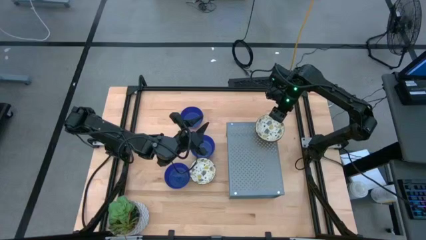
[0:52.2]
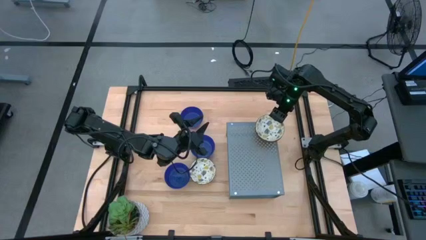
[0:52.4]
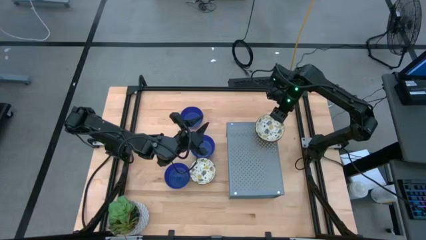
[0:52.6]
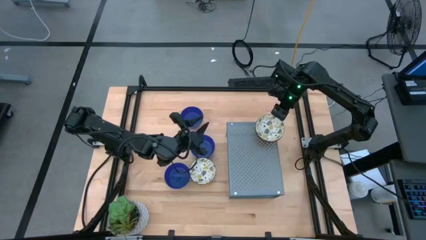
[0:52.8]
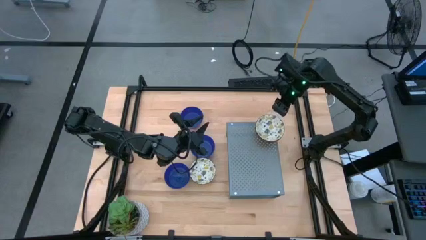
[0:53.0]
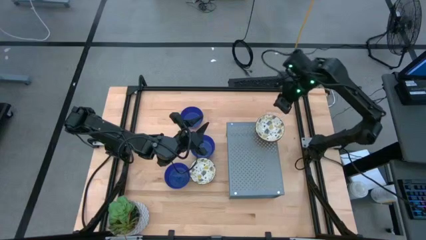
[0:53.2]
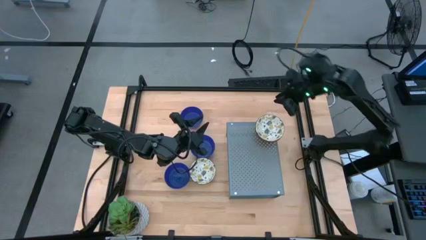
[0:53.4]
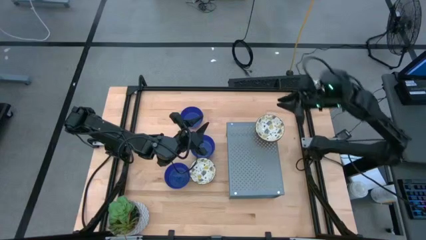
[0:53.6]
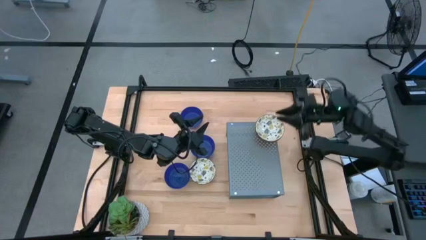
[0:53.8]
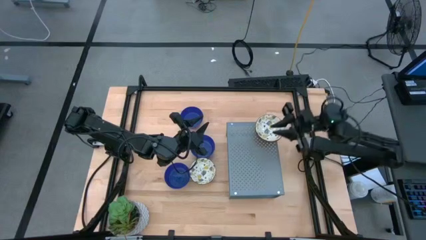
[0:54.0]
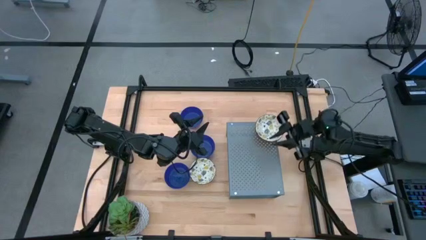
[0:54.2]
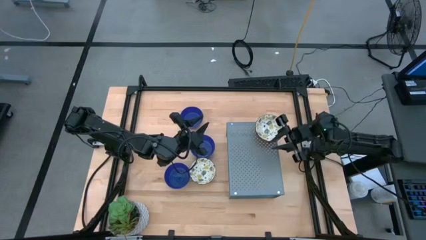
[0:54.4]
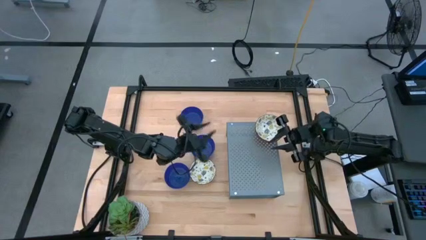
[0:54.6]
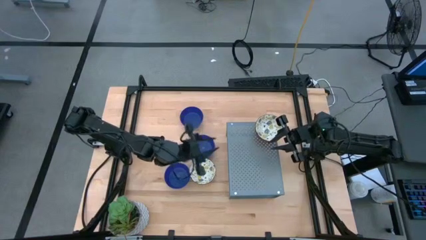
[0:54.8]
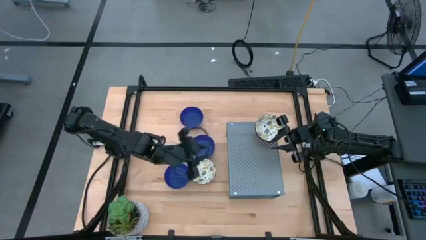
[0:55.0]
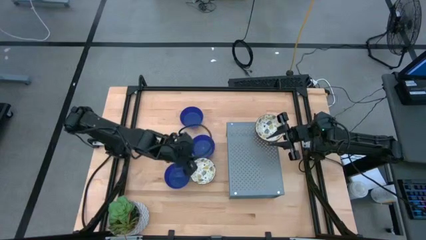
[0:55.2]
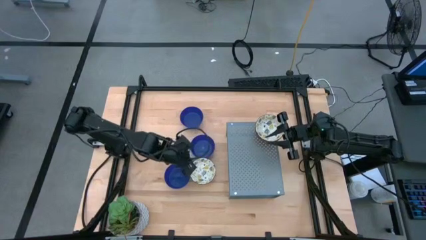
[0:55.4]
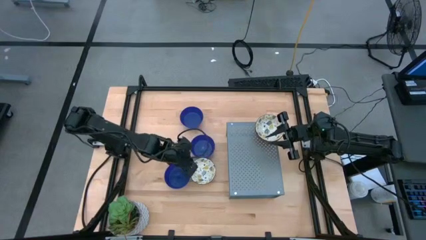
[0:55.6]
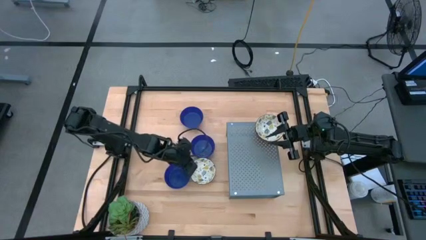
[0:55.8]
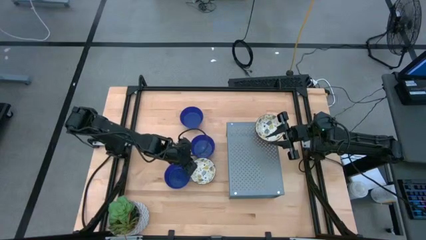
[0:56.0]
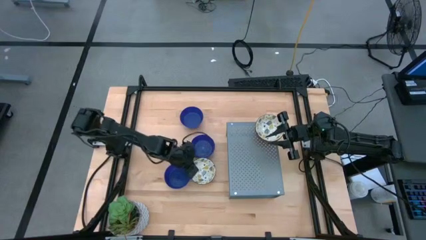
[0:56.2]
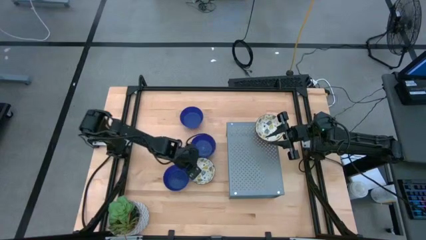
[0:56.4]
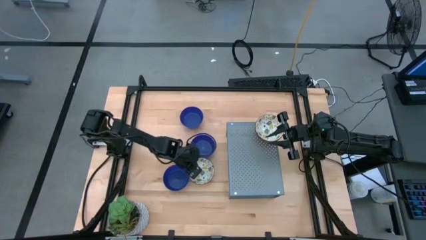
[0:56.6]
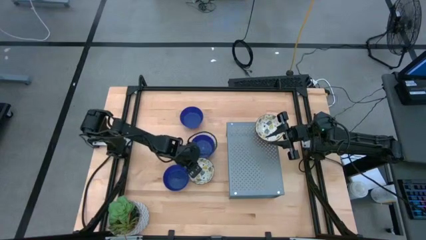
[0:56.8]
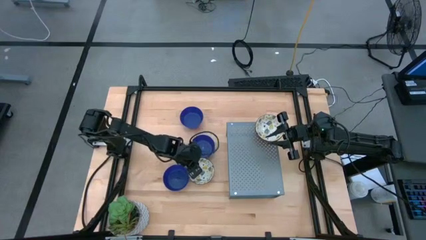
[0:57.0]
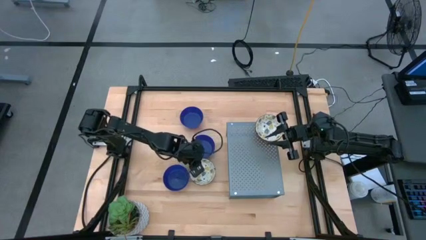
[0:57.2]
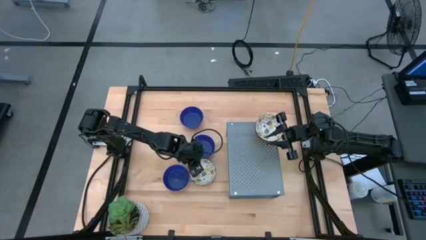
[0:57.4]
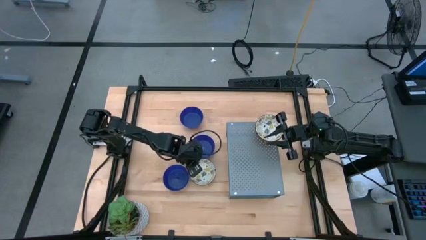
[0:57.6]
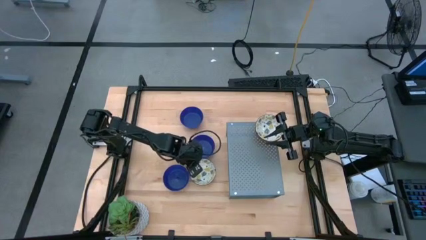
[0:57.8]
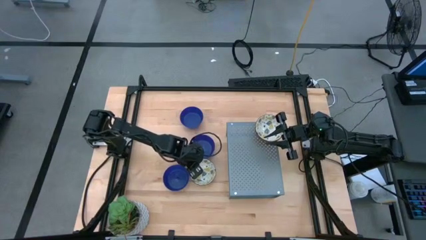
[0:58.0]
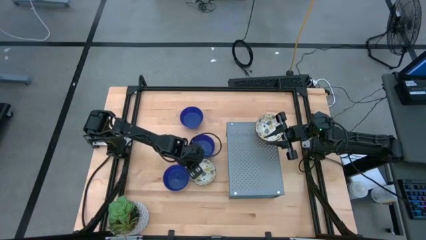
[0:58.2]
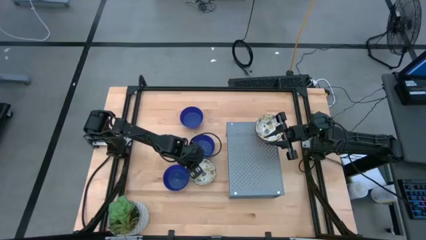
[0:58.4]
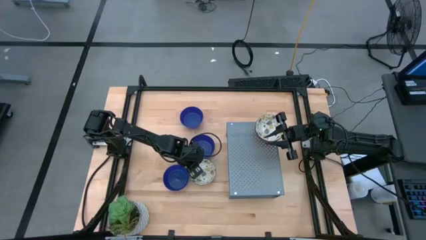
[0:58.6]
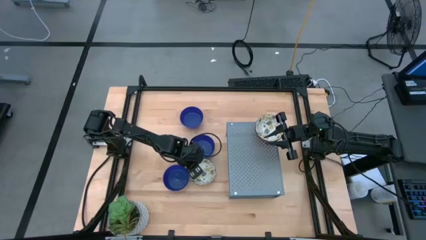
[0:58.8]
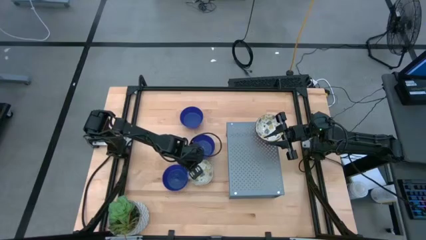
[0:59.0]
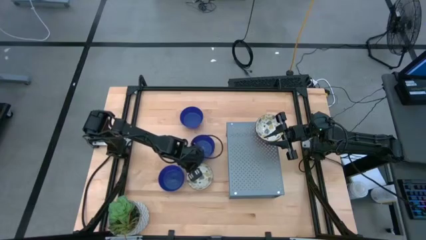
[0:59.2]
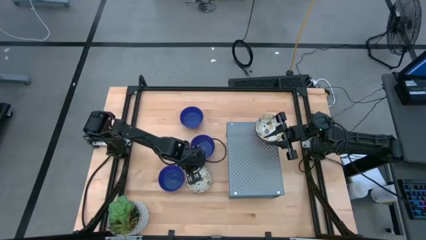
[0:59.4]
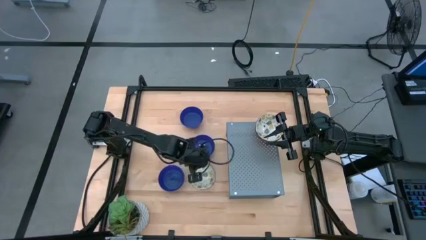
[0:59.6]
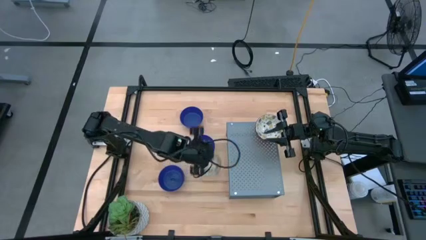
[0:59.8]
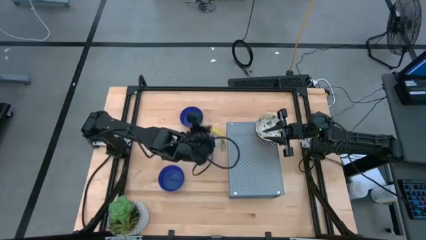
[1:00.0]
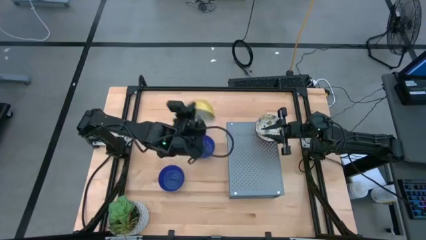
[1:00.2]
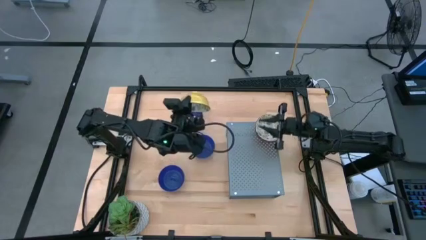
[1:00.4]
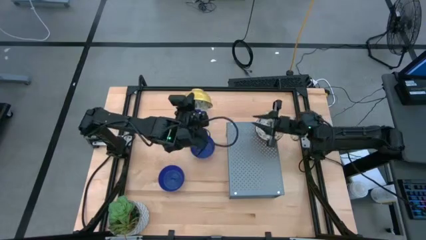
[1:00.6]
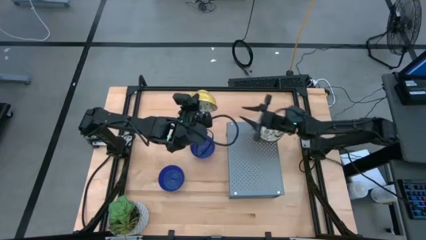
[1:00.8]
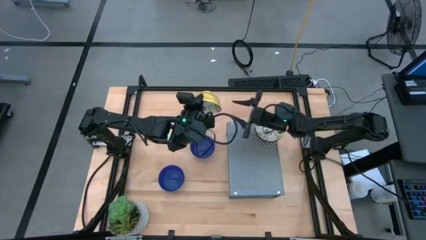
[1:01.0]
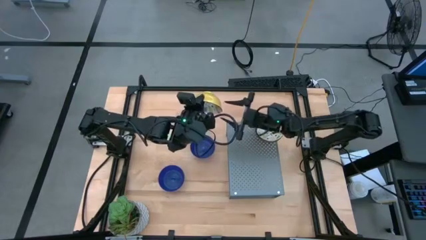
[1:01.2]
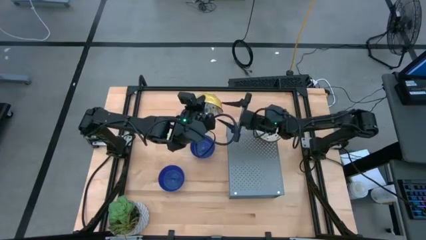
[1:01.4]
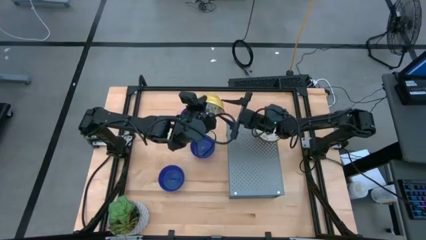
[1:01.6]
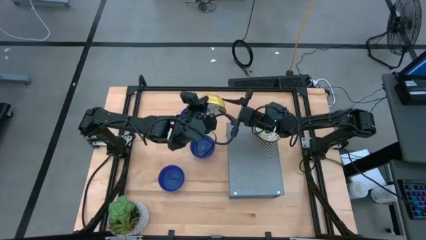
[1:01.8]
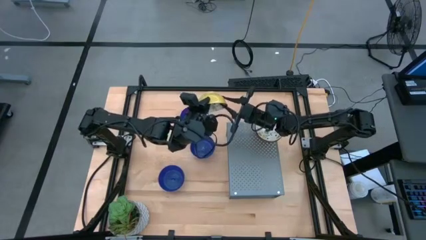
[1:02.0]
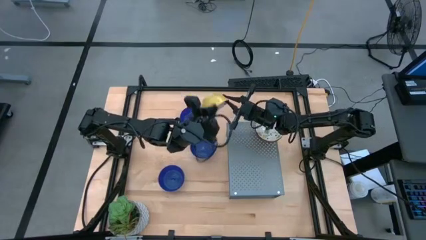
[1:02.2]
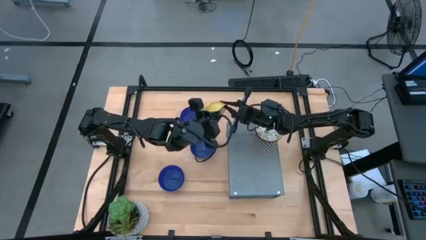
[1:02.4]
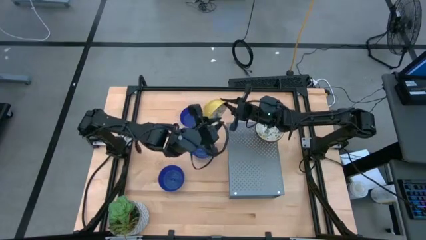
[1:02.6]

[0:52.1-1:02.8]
Task: Pick & Place Mini bowls
Stack the yellow bowl on the yellow bowl on the shelf

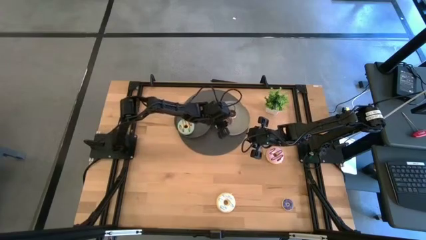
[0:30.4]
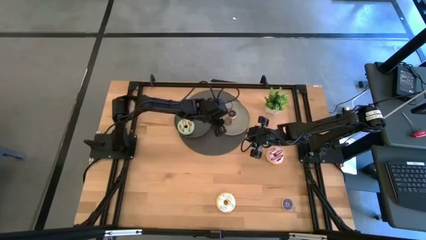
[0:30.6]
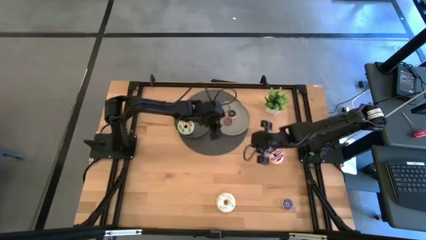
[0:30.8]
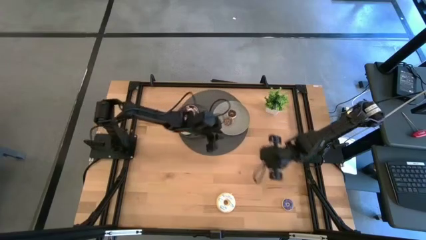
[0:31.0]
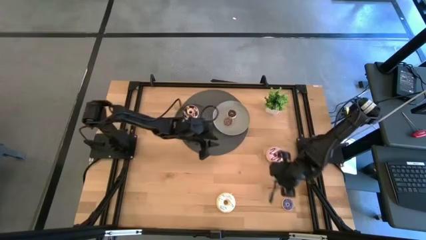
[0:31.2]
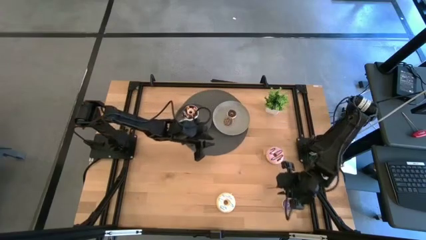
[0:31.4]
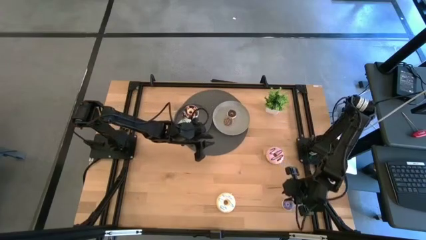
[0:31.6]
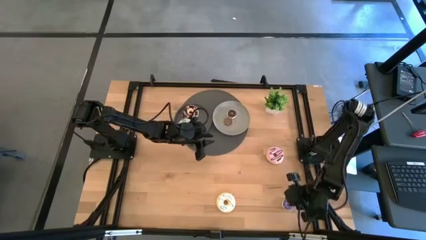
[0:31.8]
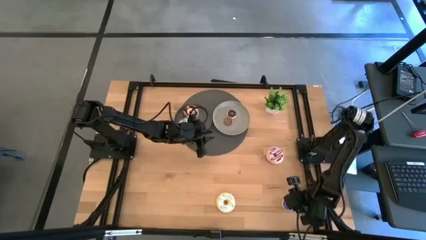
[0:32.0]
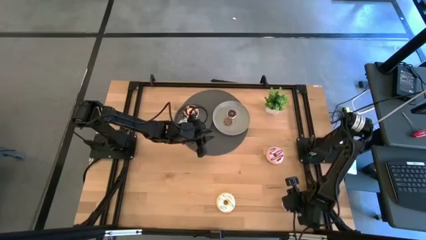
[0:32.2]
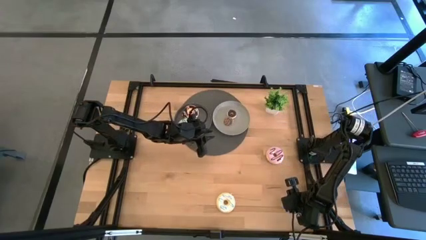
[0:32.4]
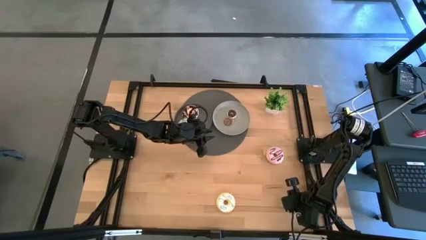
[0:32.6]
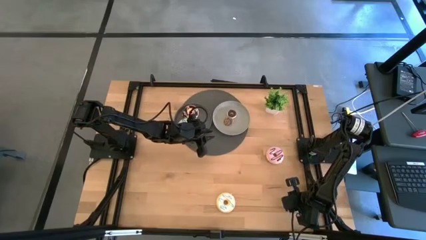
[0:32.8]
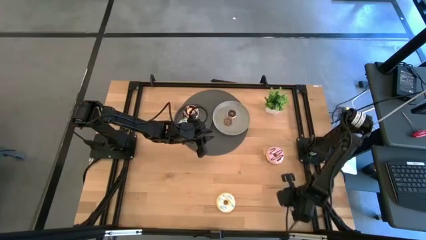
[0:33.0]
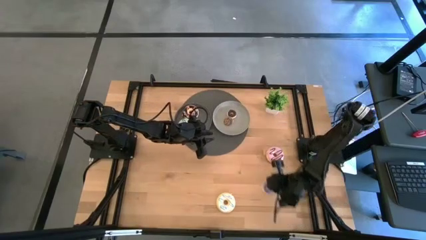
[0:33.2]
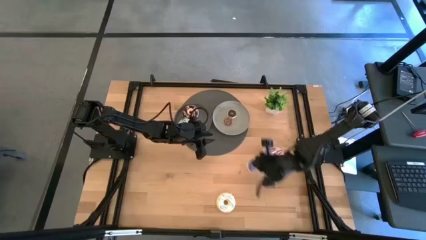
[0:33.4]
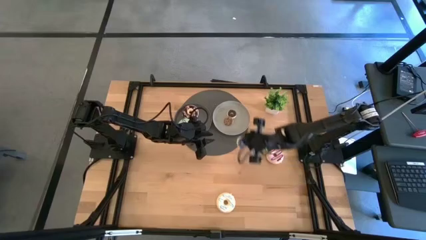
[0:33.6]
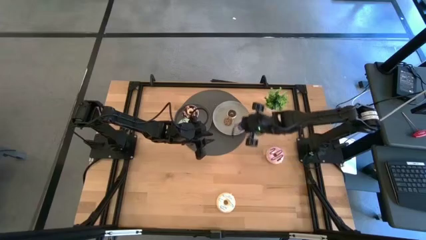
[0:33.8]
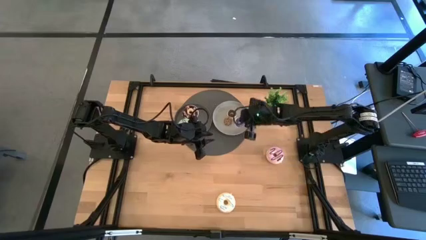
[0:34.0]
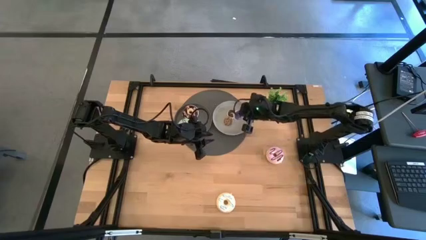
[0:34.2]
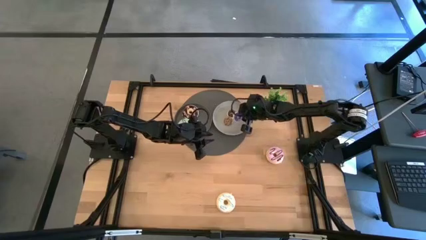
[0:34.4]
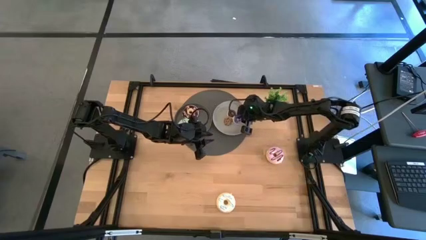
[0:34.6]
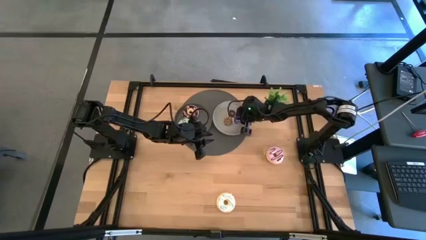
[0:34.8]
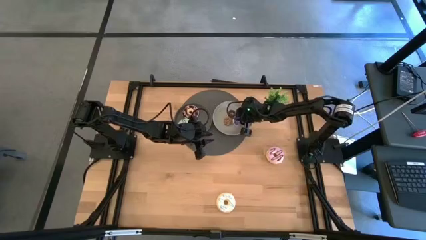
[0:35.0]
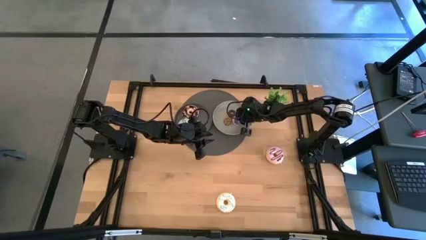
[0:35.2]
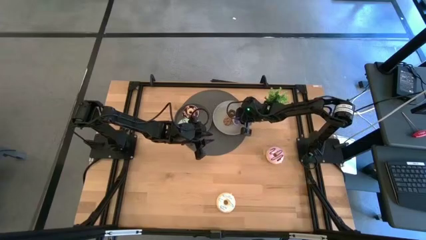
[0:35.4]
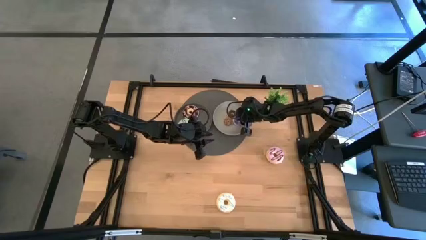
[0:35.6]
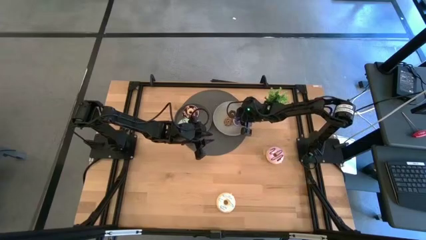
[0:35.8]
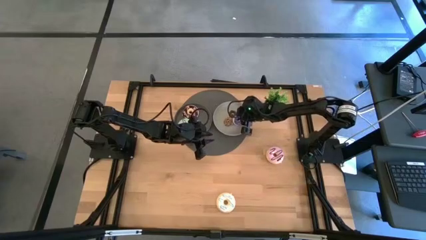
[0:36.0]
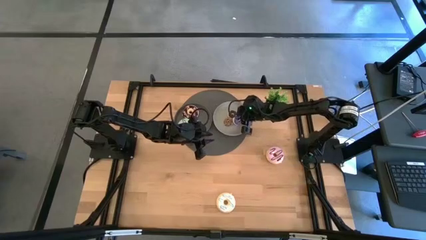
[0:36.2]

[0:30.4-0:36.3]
Task: Pick & Place donuts
Put the small blue doughnut on the gray plate
